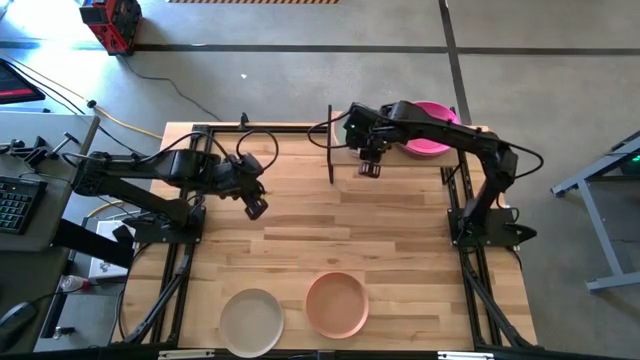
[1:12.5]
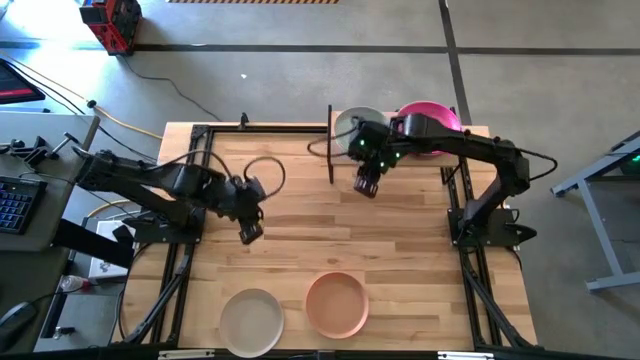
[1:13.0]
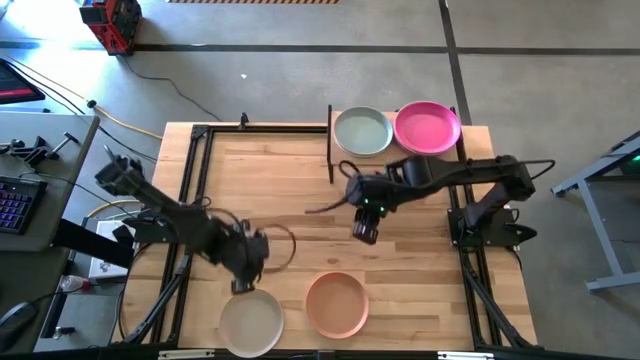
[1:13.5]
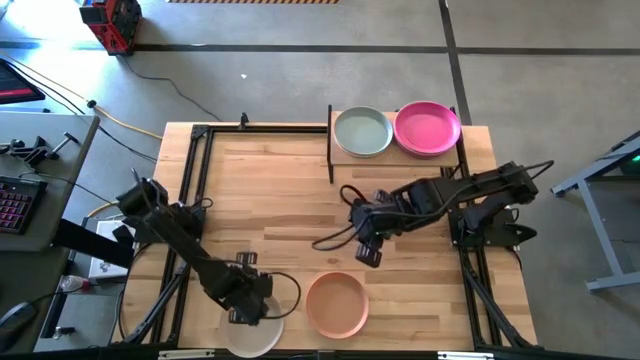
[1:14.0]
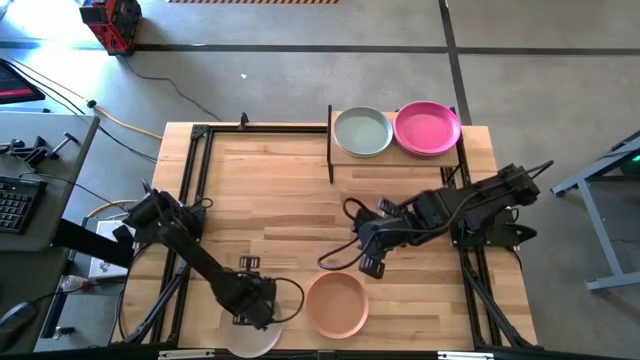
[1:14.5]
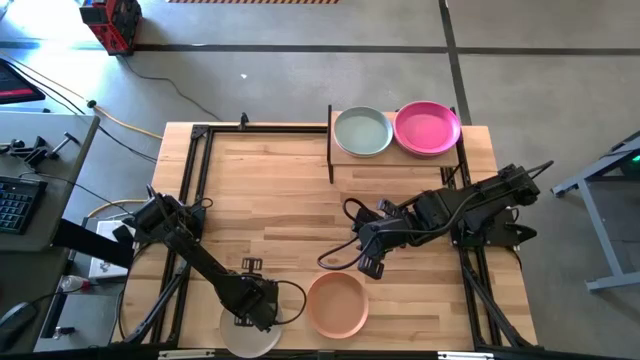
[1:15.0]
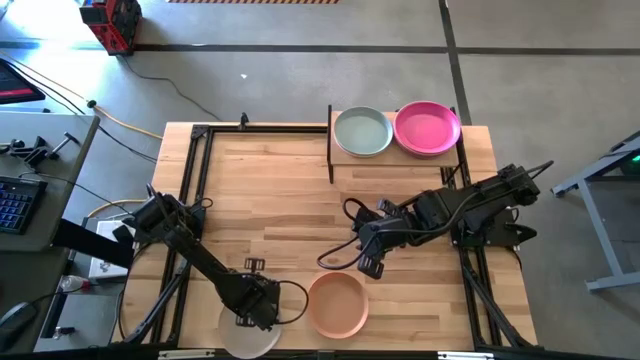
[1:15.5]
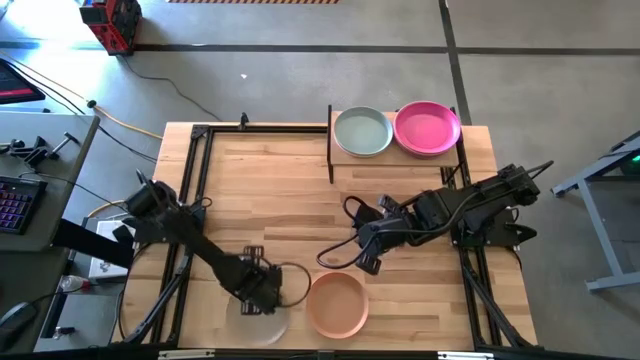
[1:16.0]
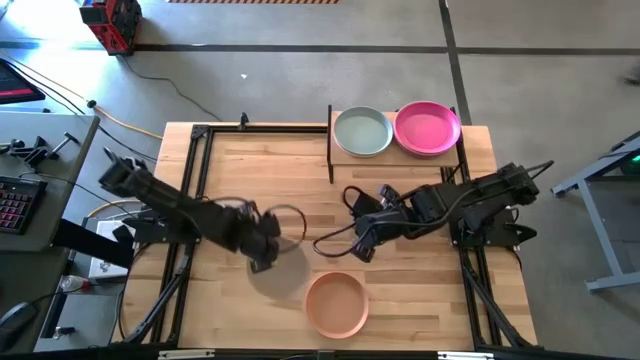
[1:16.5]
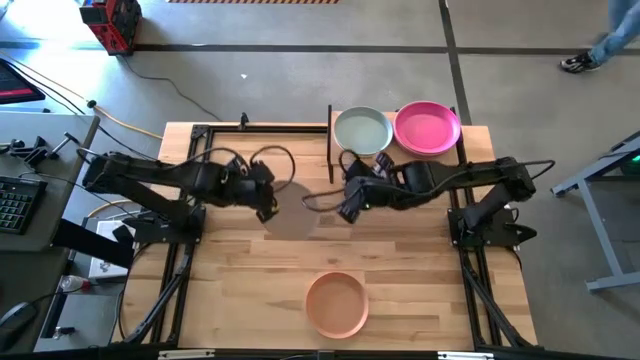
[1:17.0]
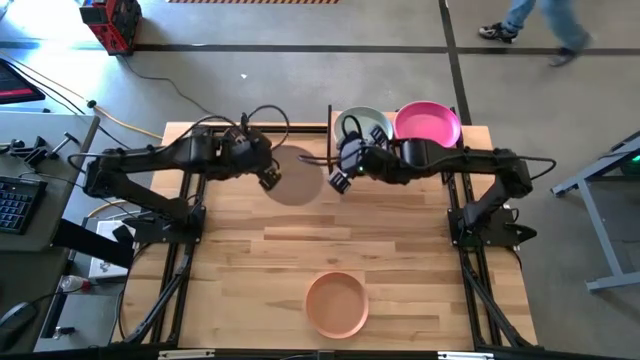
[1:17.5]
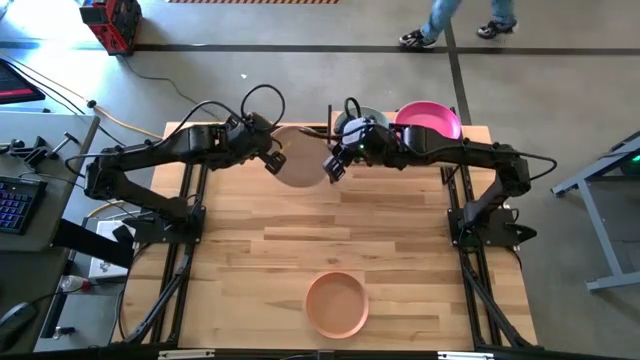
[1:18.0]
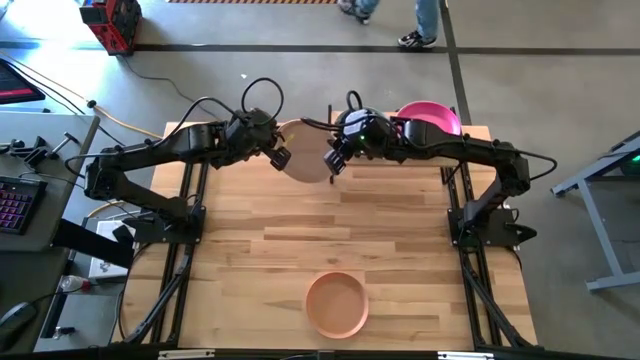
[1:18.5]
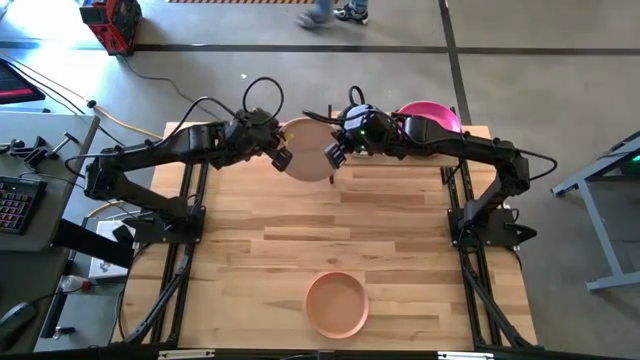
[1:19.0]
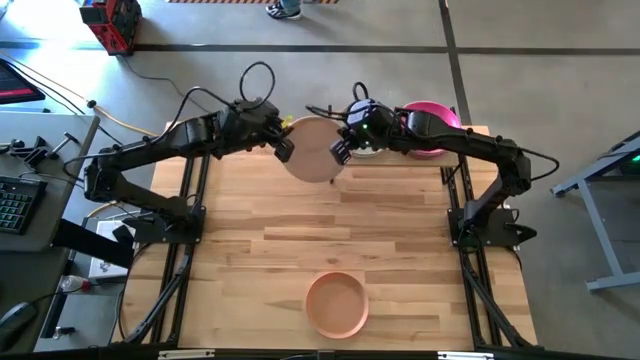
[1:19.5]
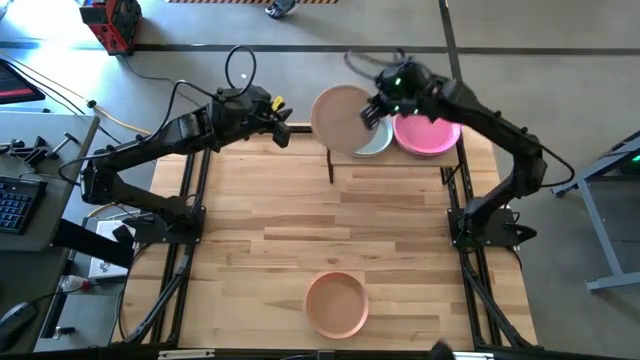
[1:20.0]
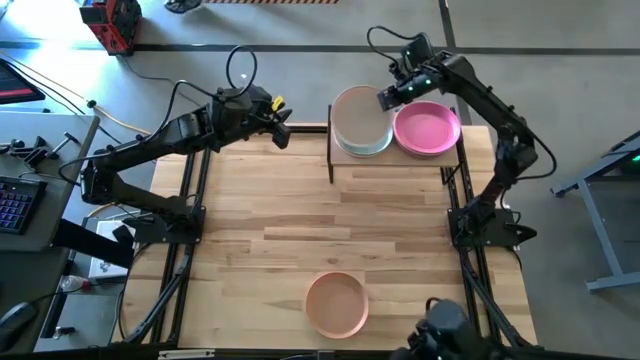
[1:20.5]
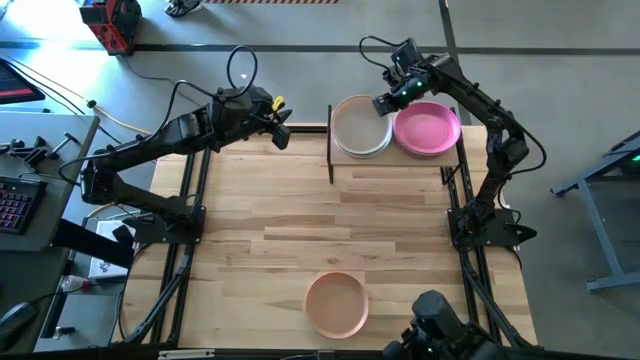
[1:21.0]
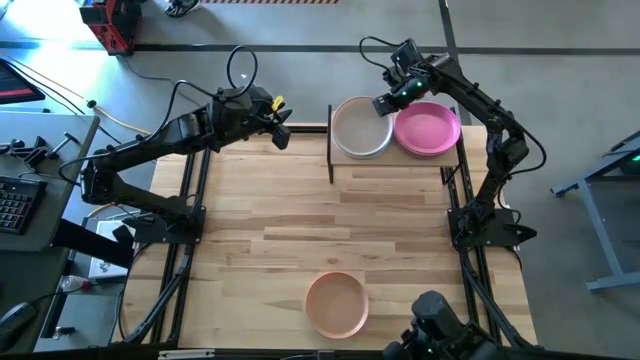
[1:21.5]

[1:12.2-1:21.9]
Task: Place and stack plates onto a shelf
Stack the gray plate on top of the light blue plate on the shelf

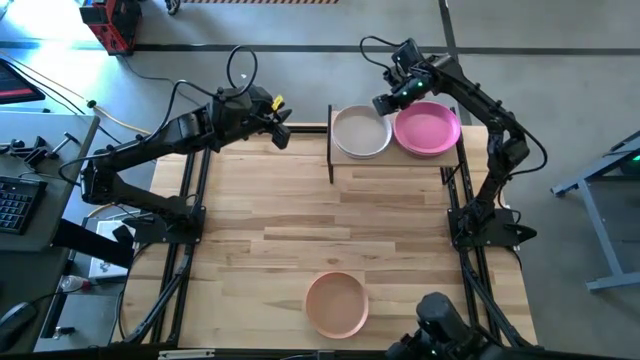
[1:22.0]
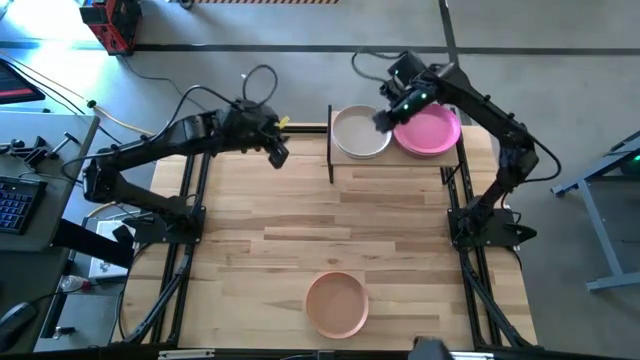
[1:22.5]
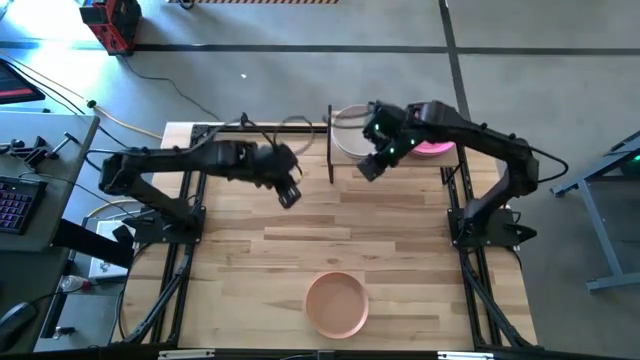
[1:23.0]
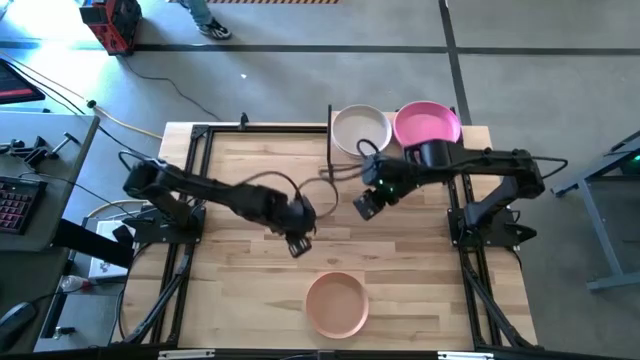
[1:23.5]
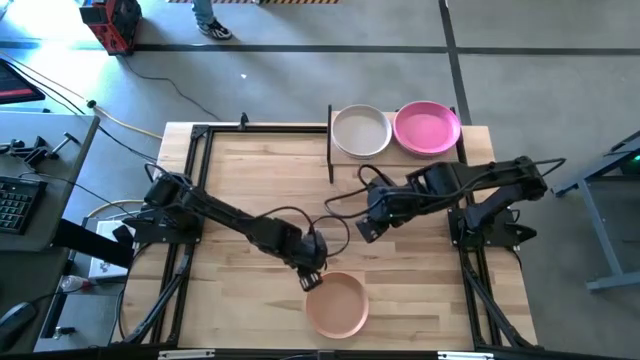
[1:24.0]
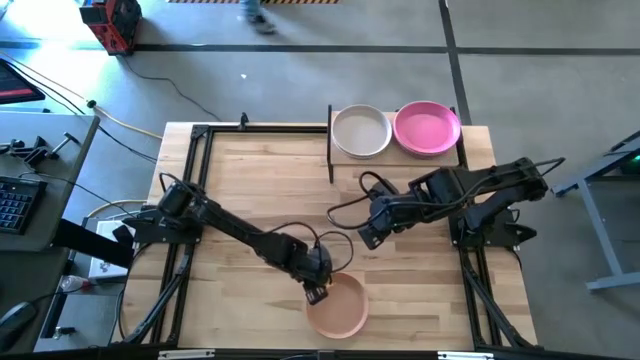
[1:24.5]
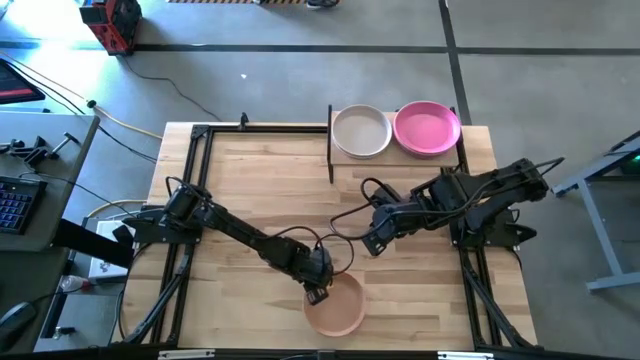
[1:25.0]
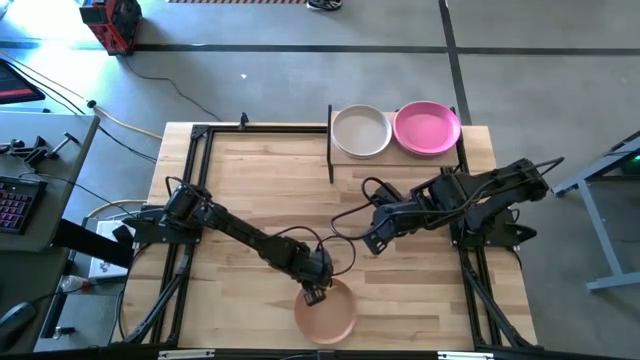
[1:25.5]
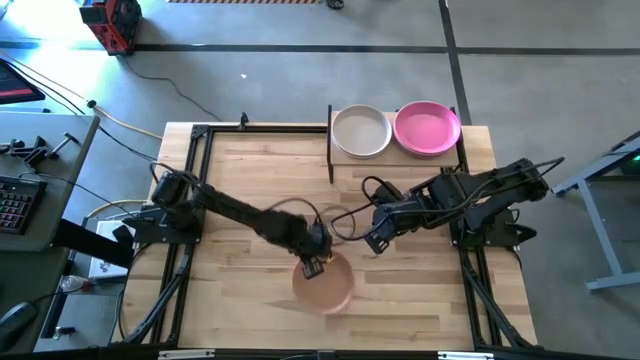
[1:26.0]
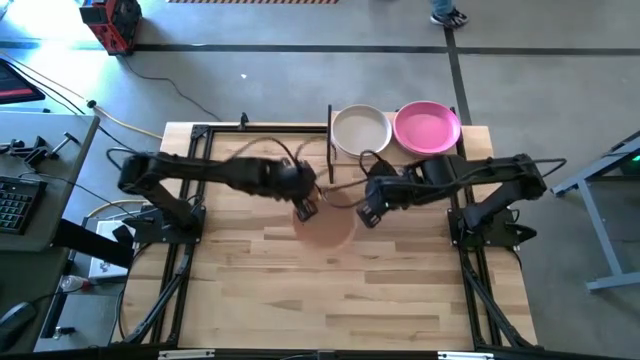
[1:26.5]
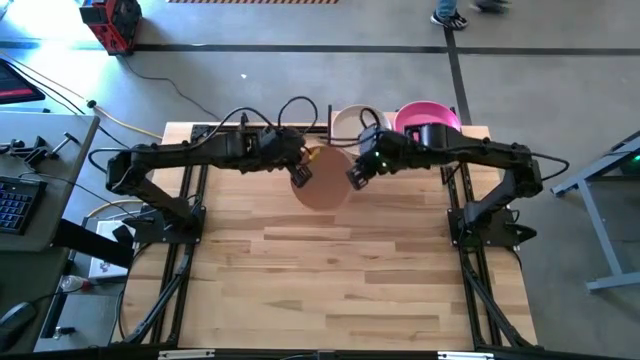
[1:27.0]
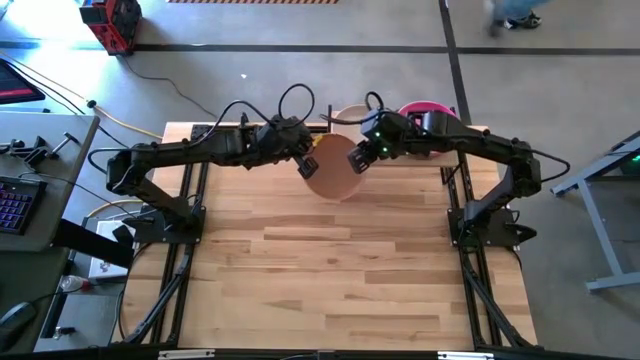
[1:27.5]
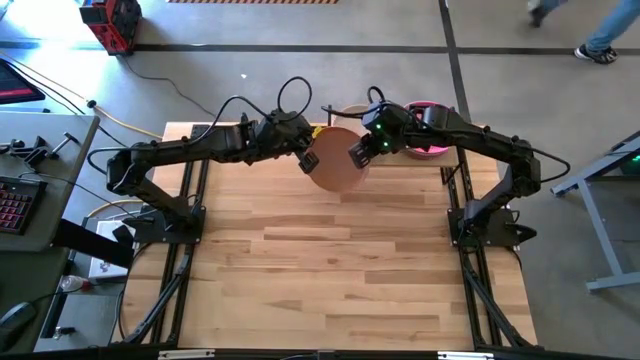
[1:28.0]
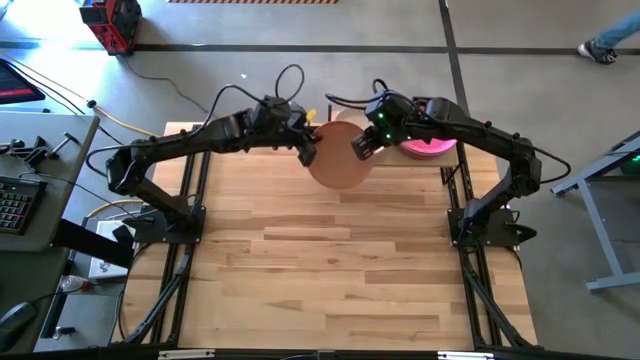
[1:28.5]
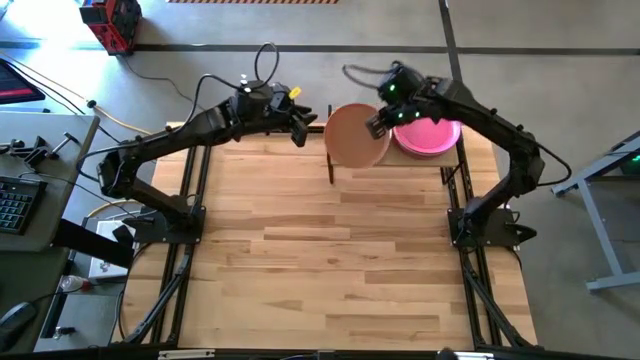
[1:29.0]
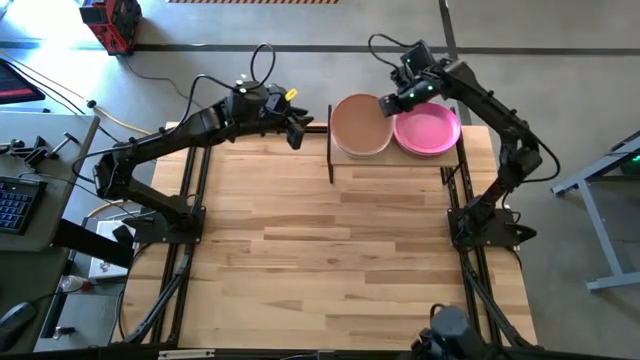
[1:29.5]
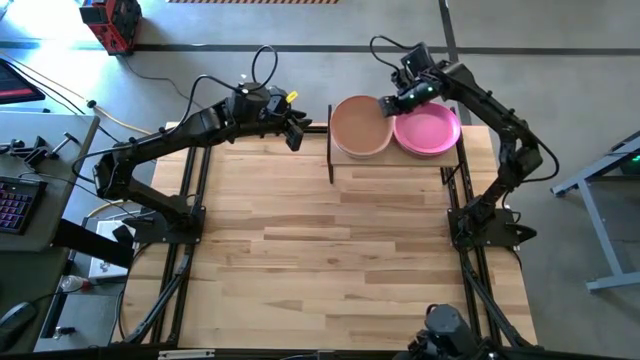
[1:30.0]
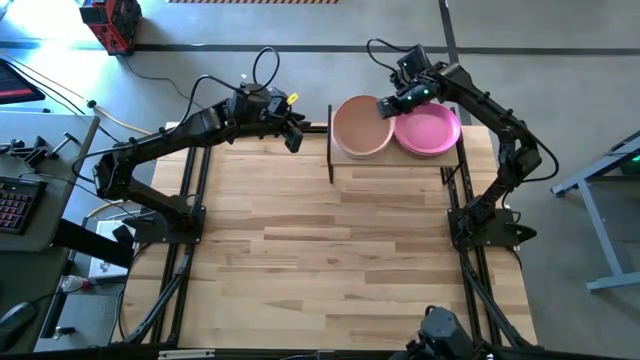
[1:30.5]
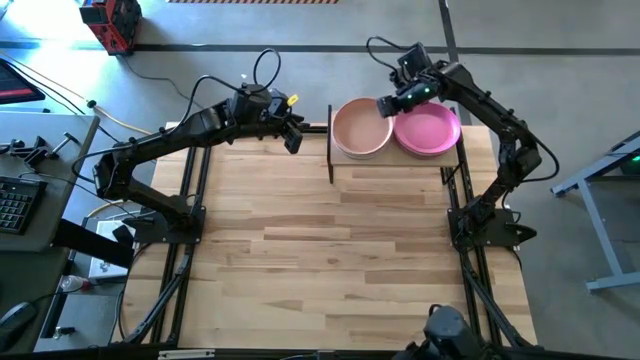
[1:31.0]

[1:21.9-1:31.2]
Stack the brown plate on top of the gray plate on the shelf

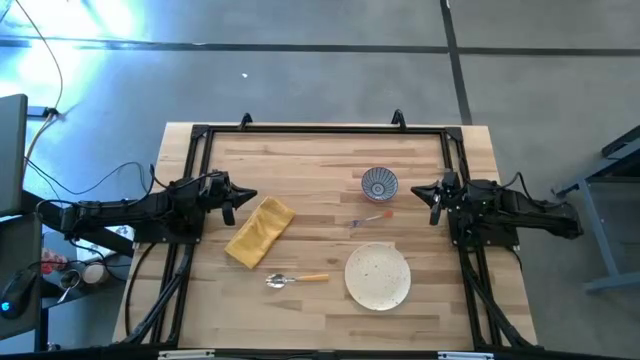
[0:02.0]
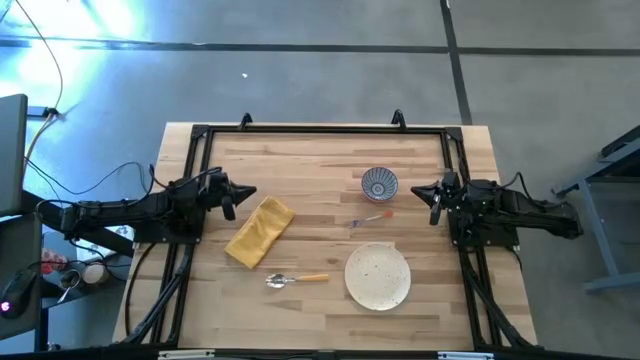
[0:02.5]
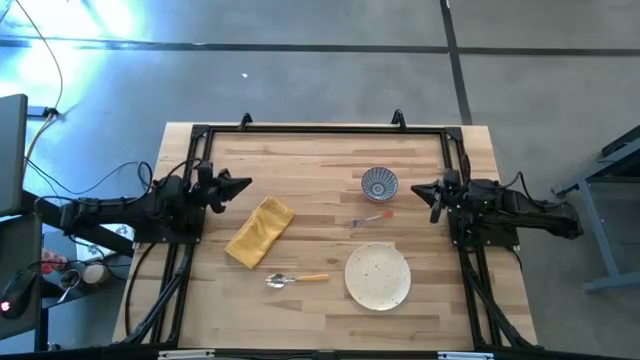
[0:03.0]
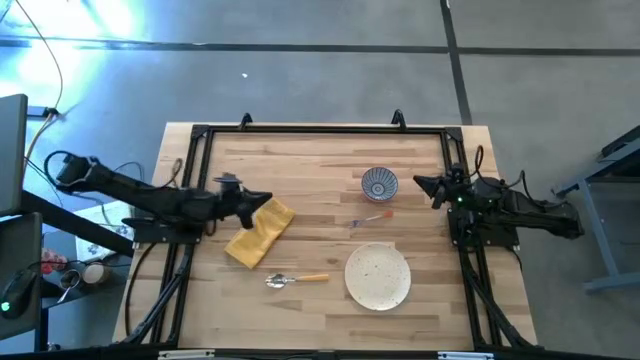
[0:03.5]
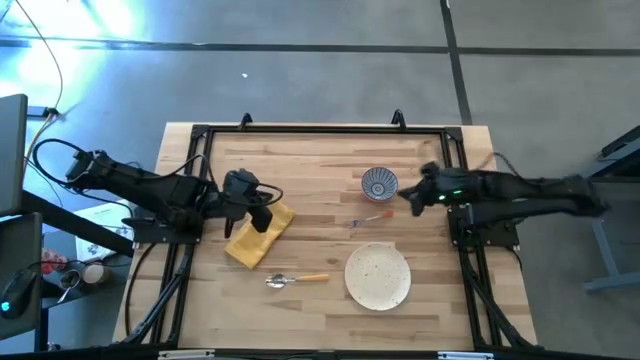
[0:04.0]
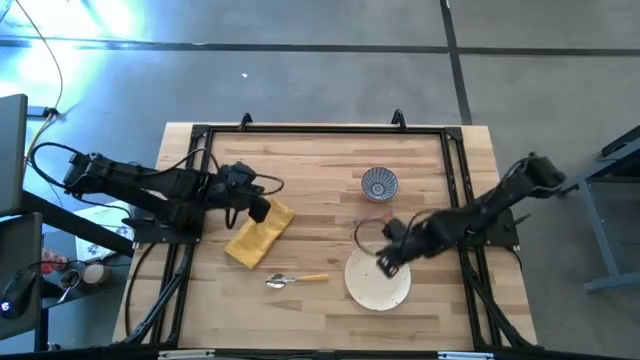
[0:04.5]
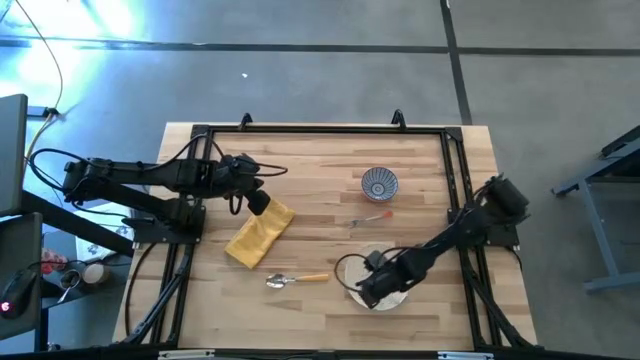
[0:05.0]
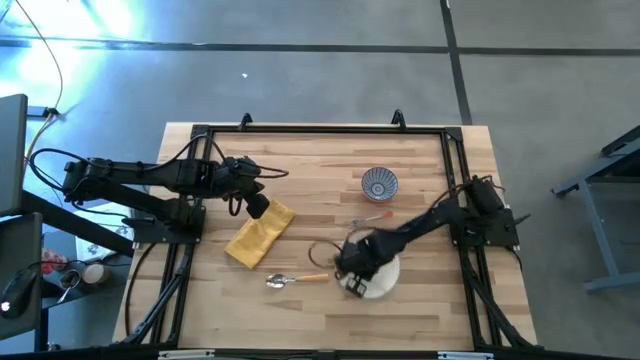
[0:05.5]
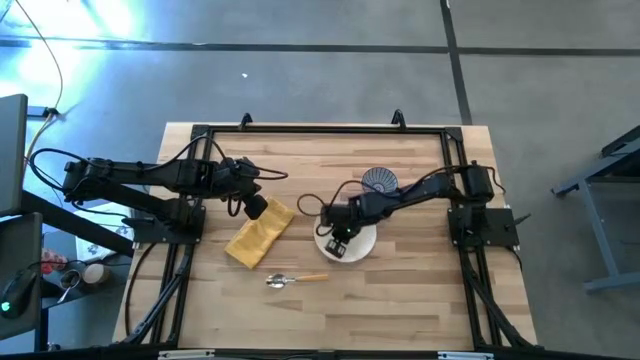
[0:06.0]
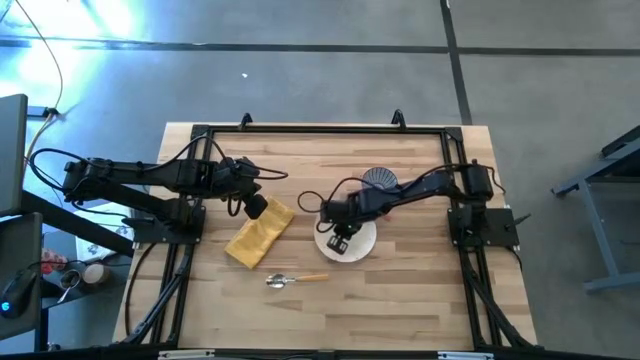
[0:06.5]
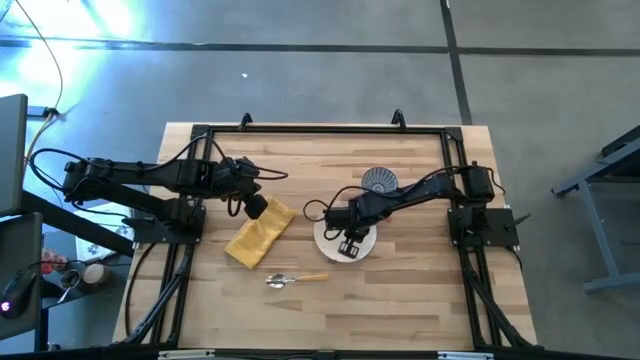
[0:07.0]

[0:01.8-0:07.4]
Task: Set table place
Move the white patterned plate to the center of the table
